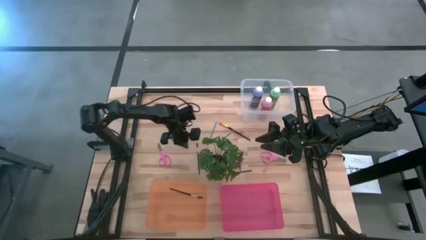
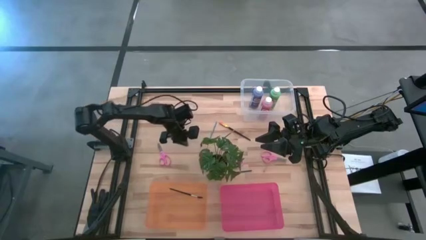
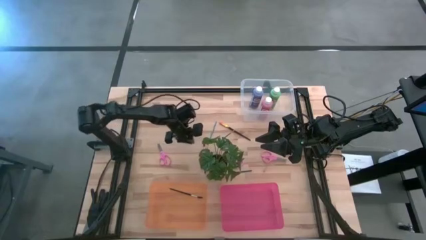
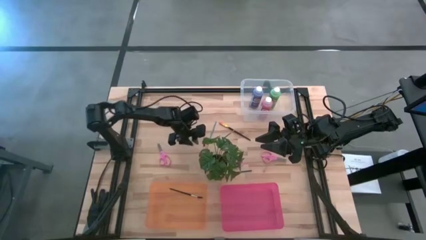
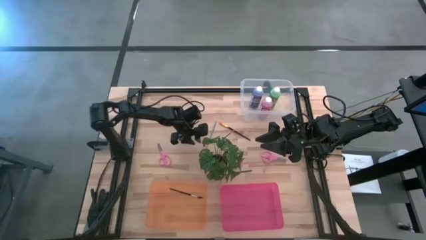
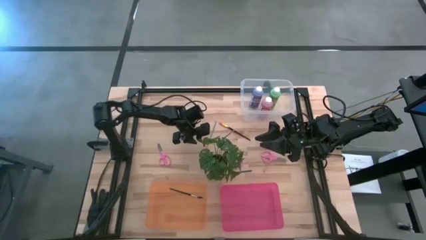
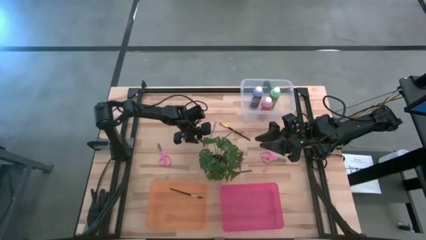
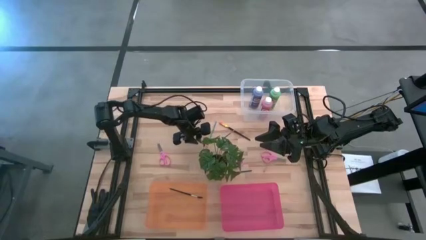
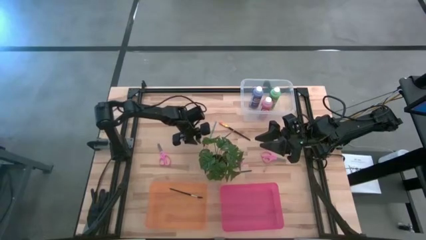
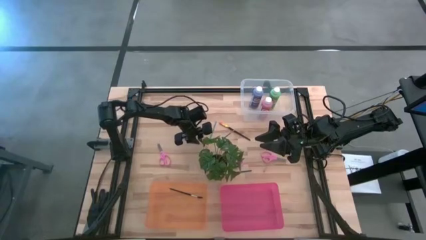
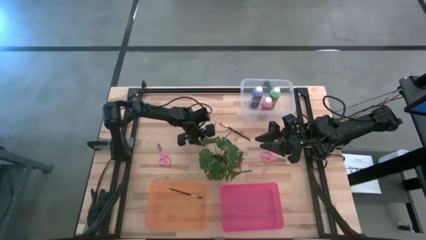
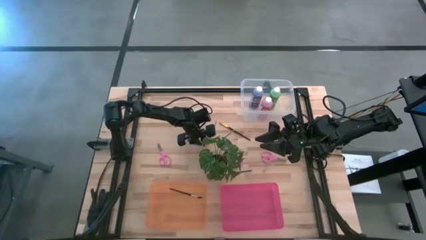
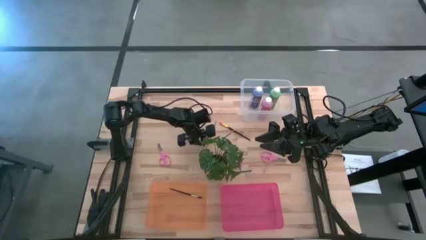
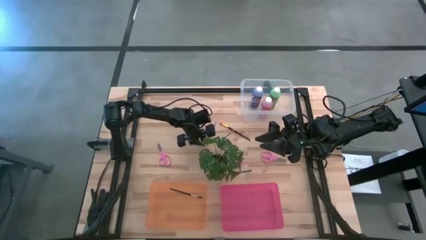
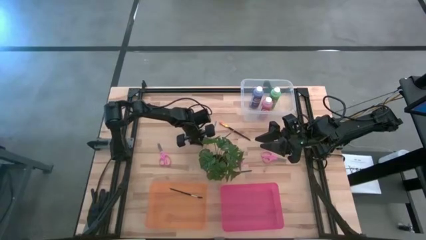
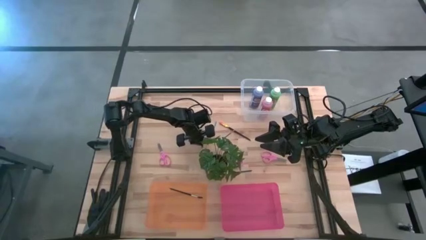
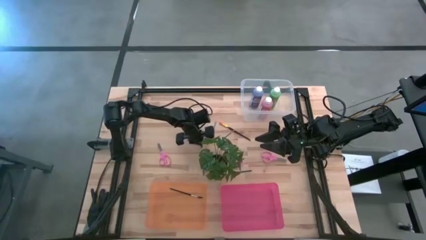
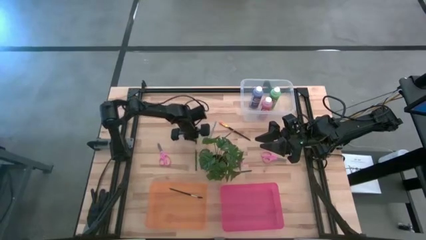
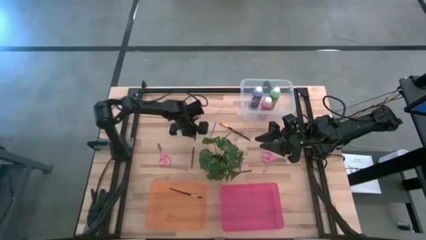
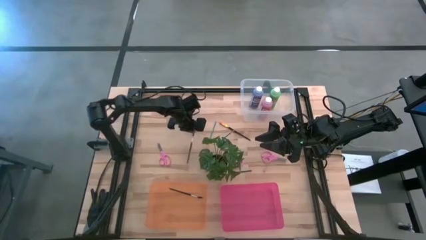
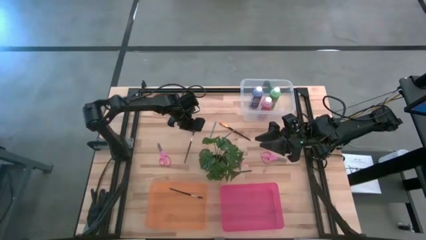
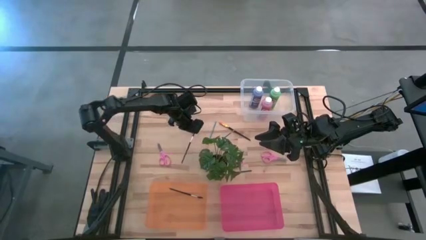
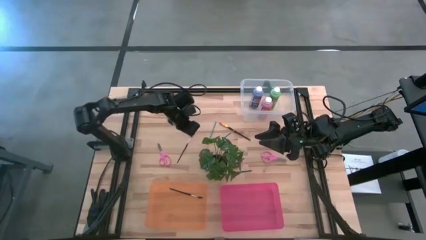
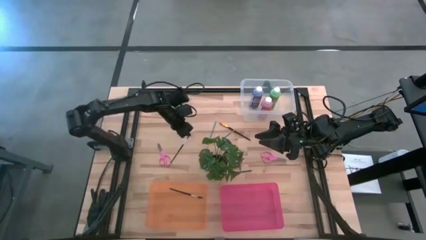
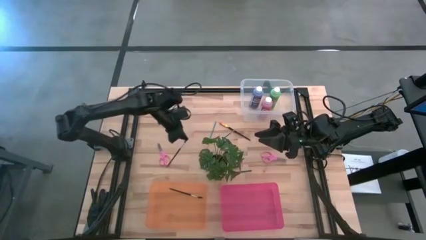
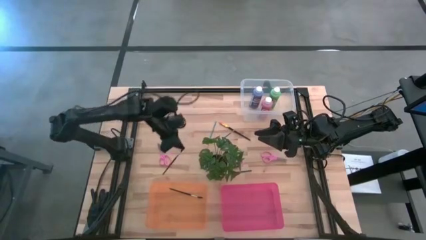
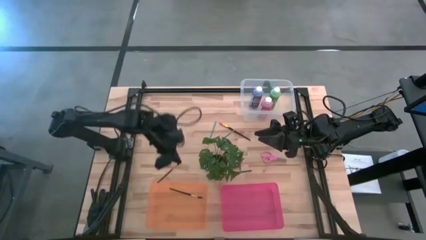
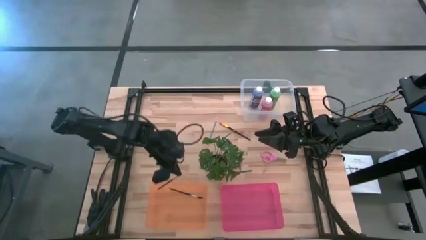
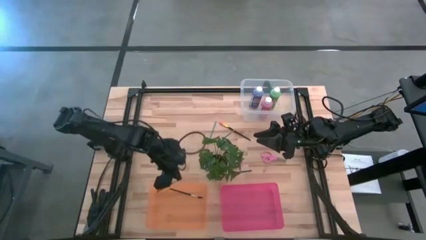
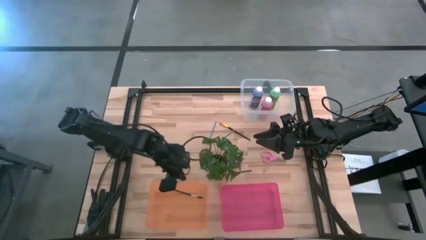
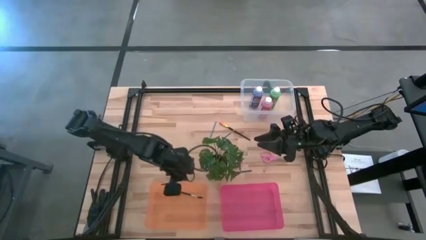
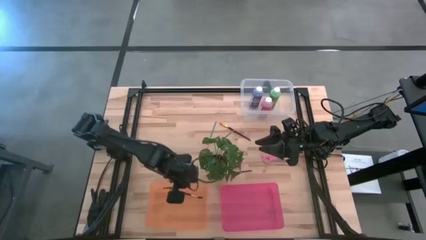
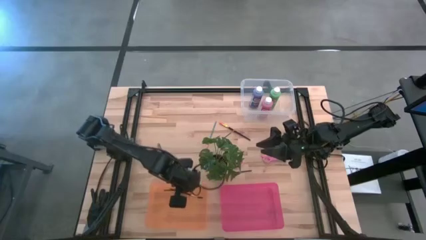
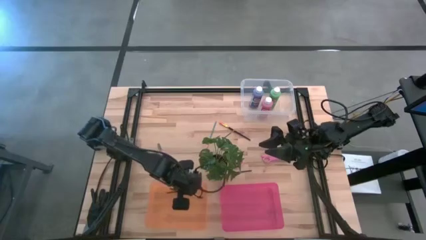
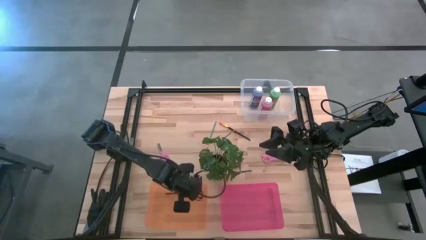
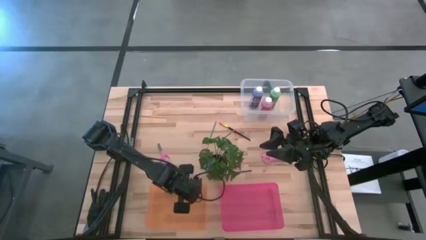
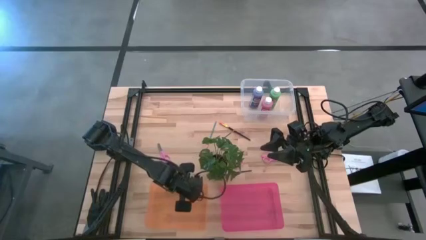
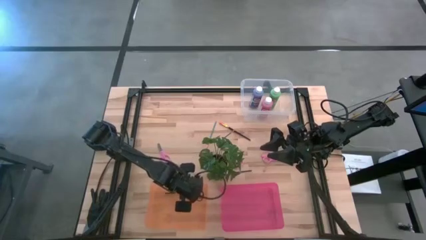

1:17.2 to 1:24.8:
Task: Pick & Place Paint Supplies
Put the black lash brush into the orange bin

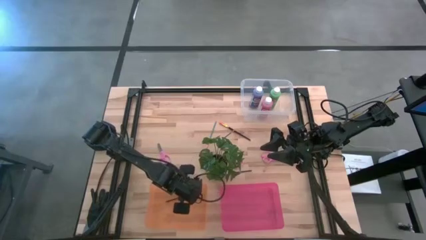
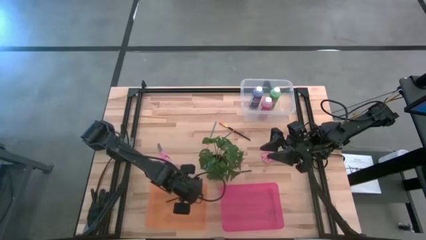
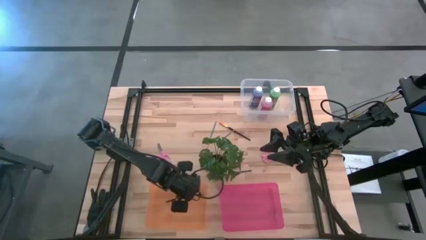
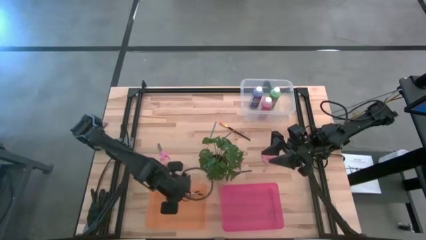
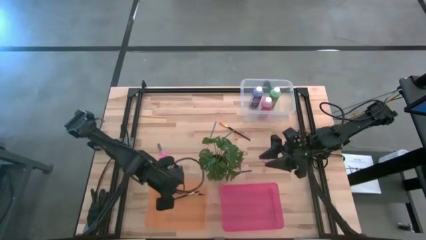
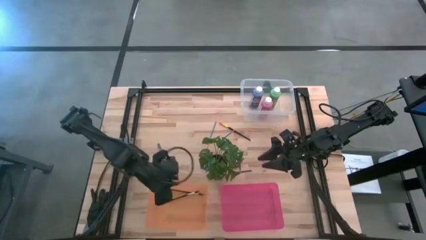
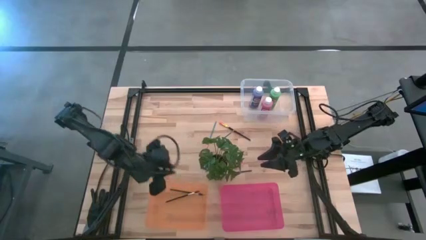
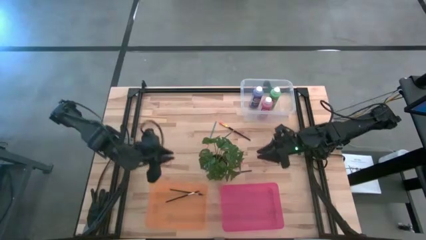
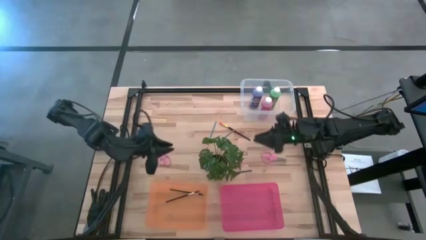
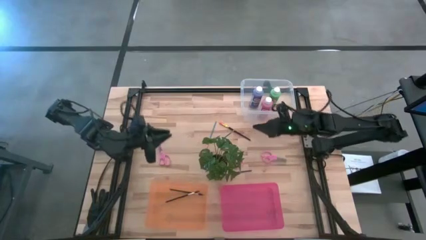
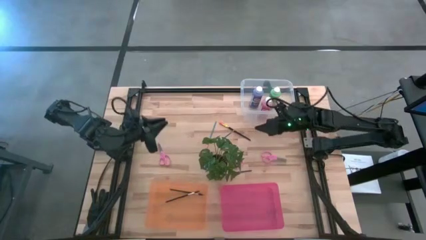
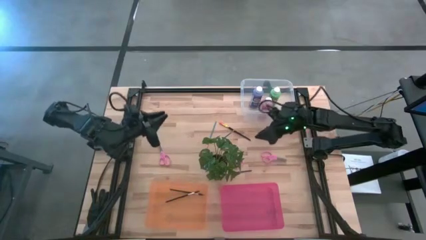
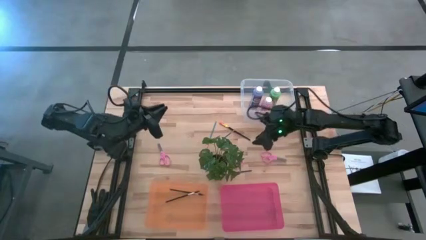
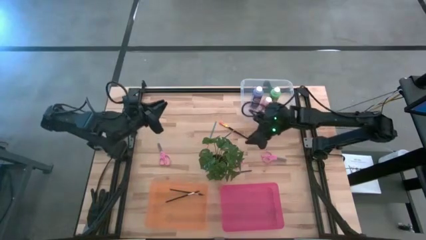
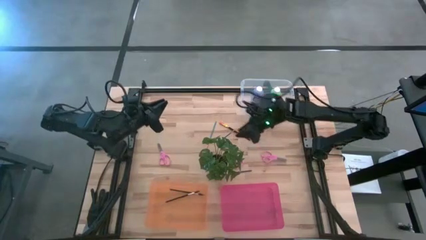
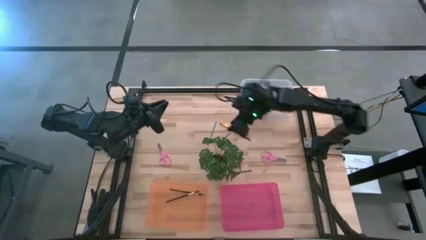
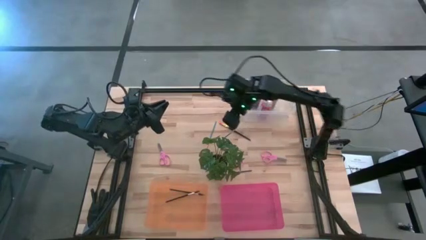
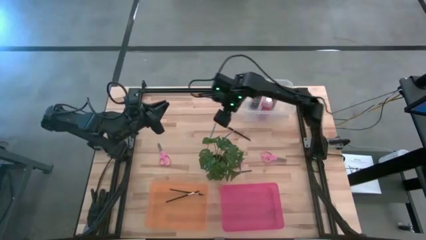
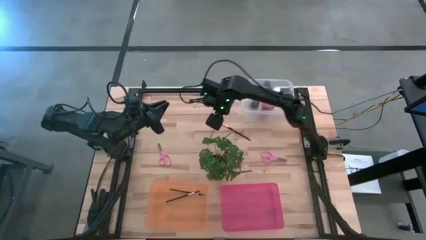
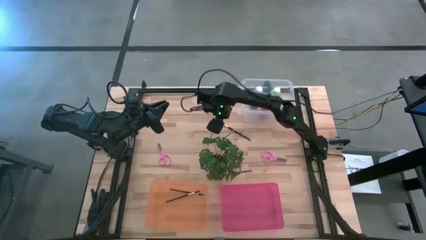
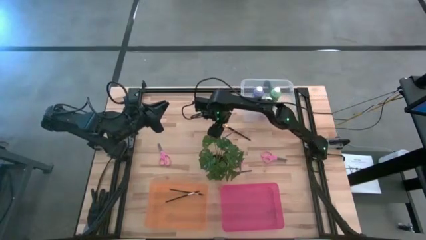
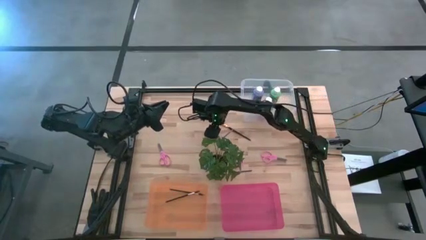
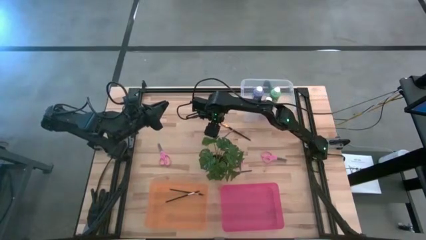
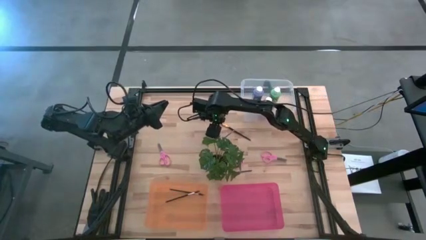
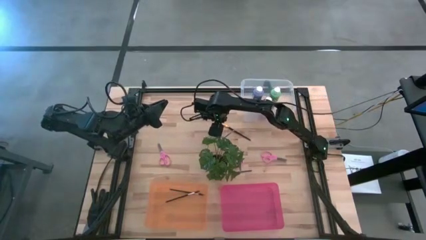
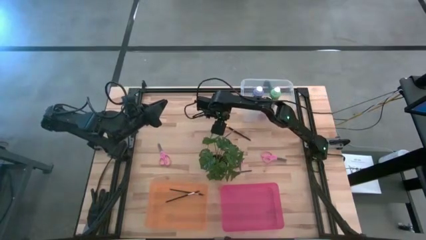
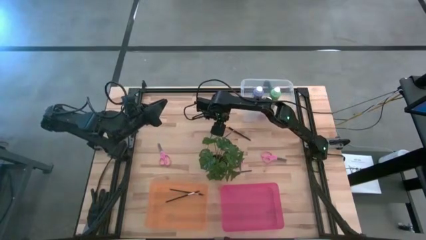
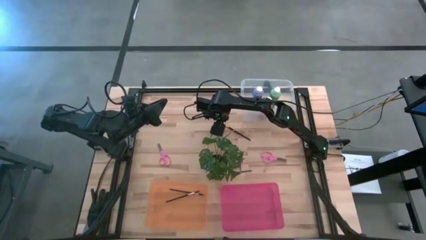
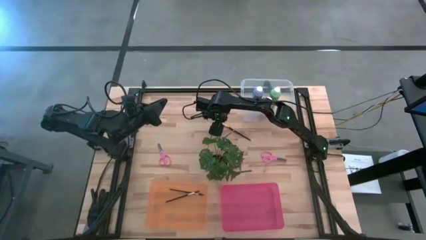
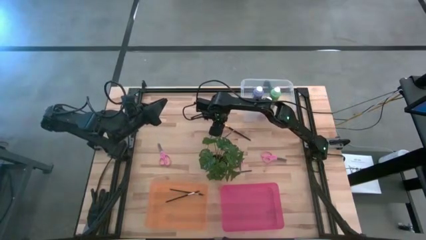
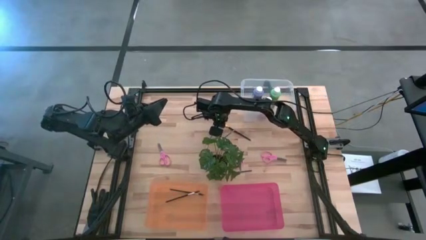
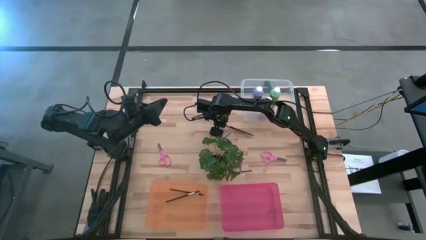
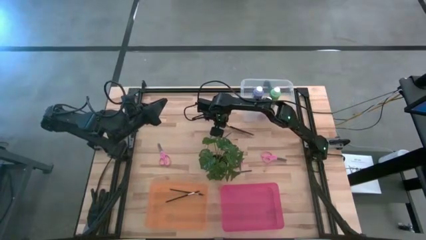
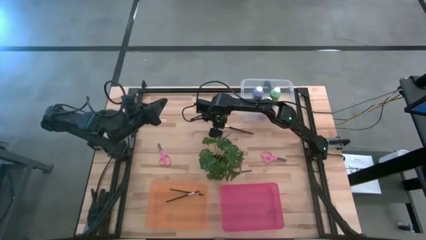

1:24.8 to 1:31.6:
Put the black paint brush into the orange bin
